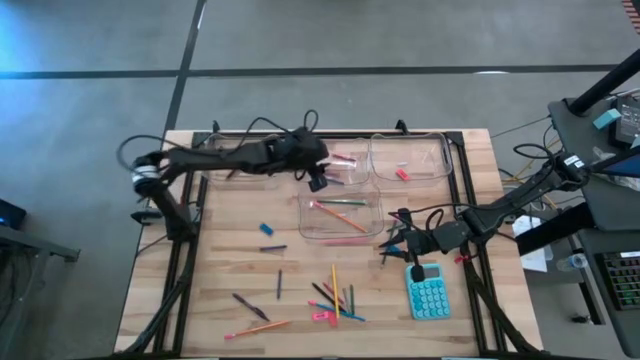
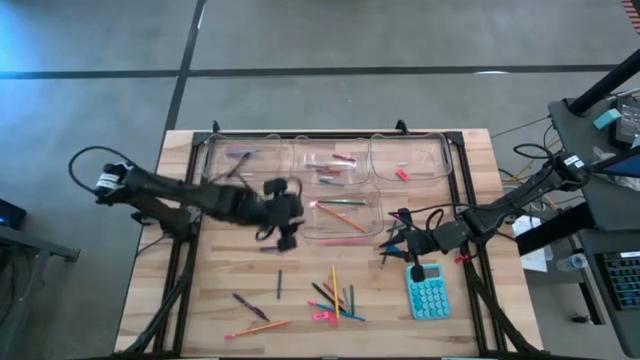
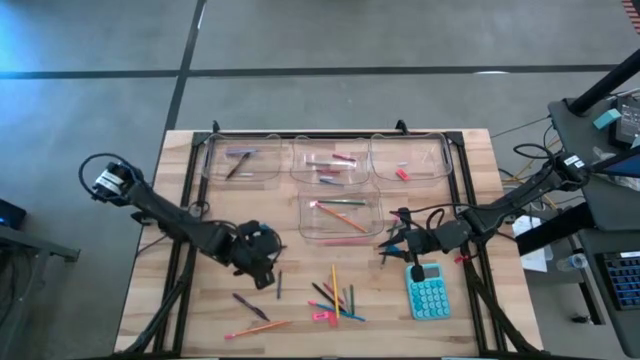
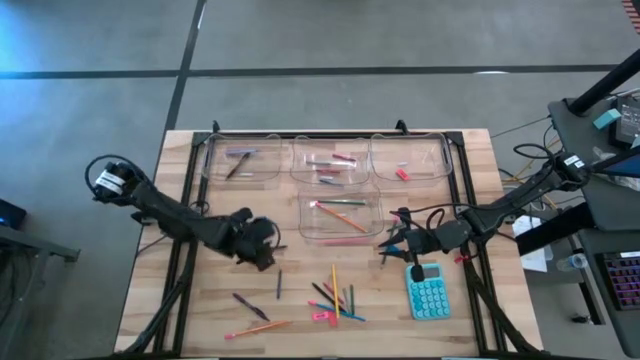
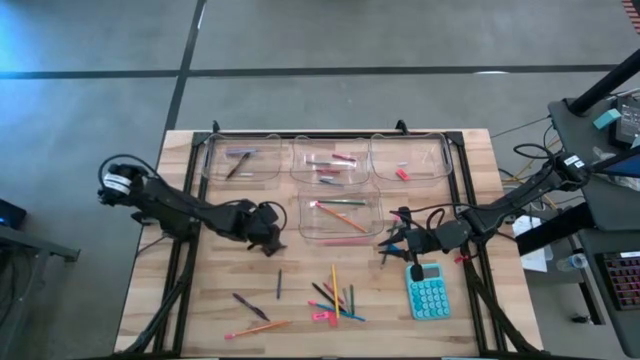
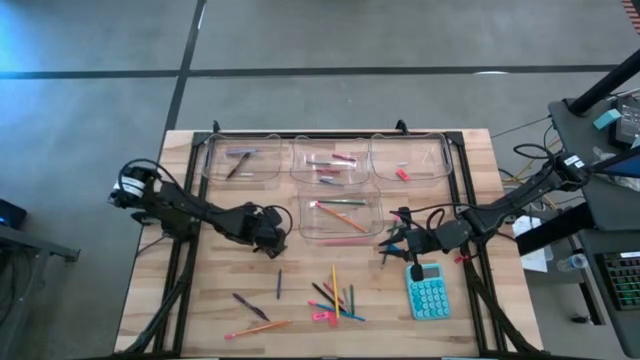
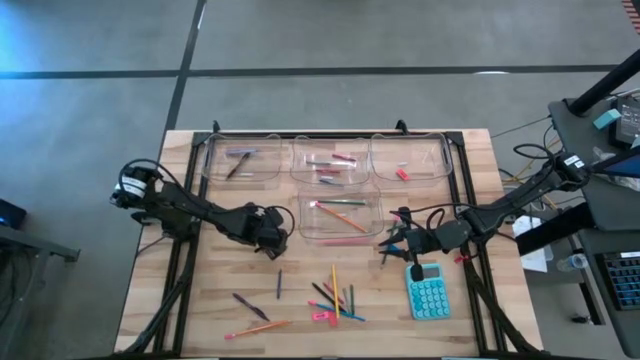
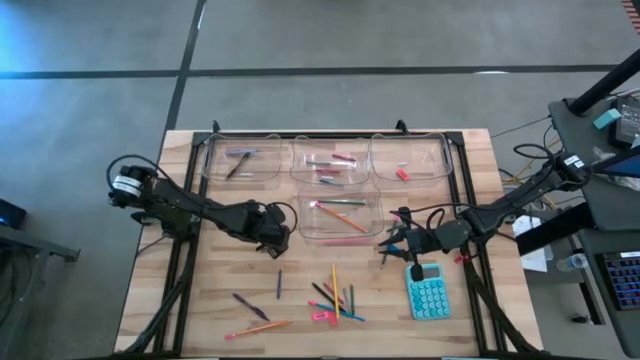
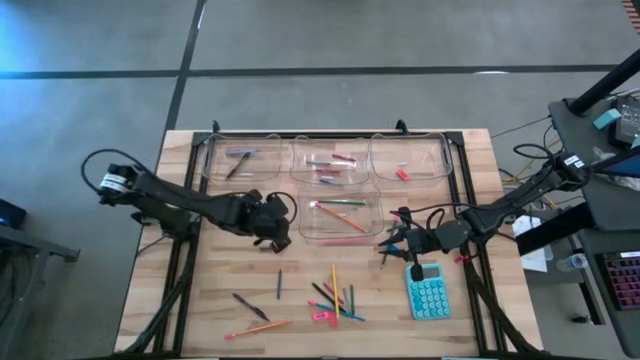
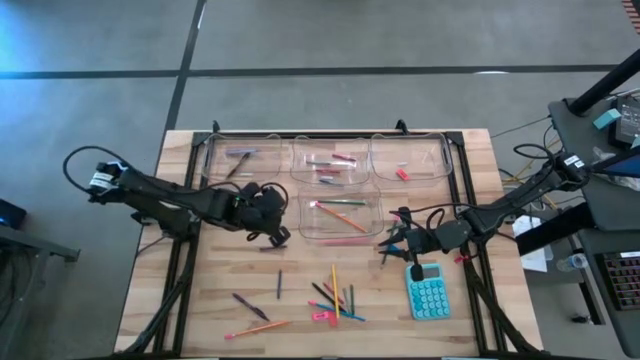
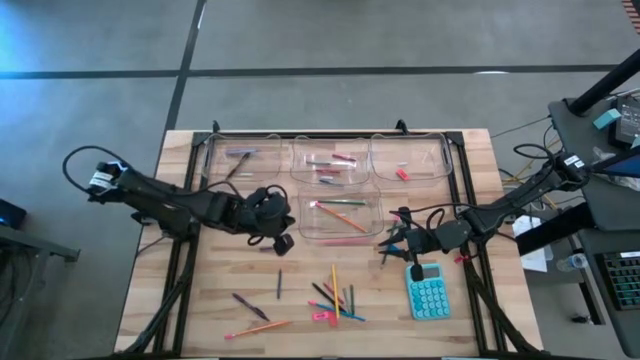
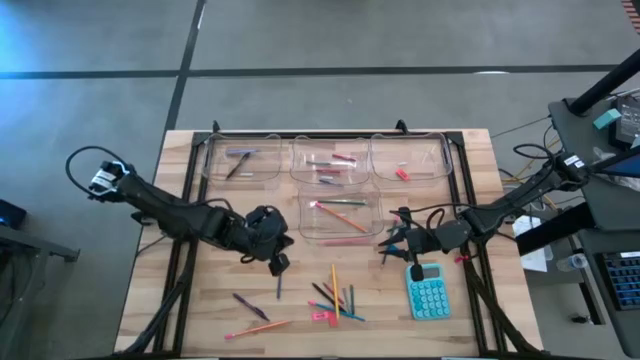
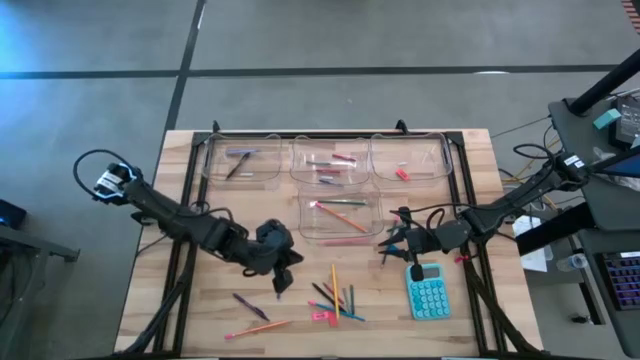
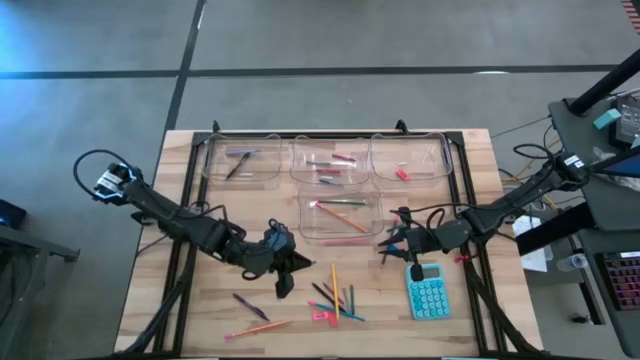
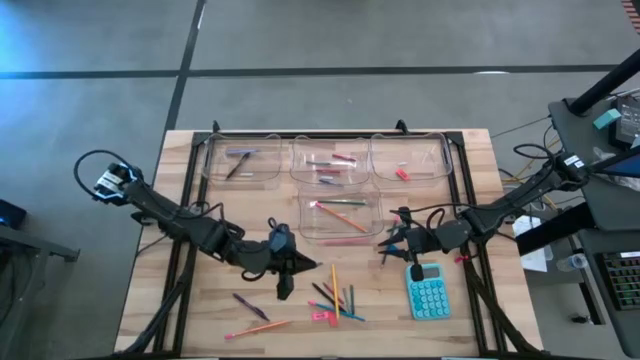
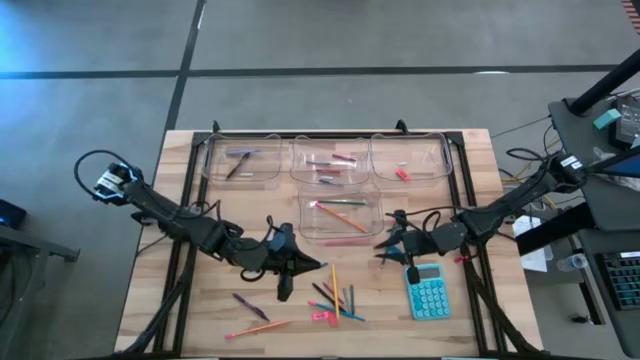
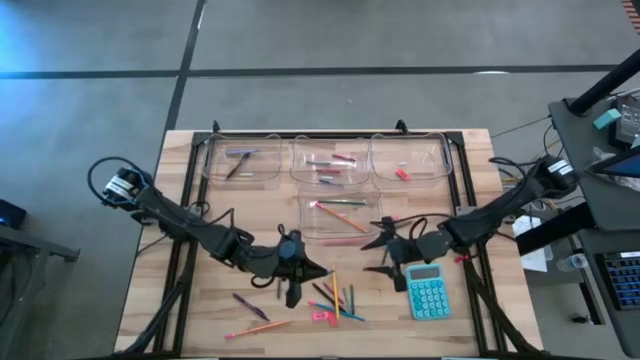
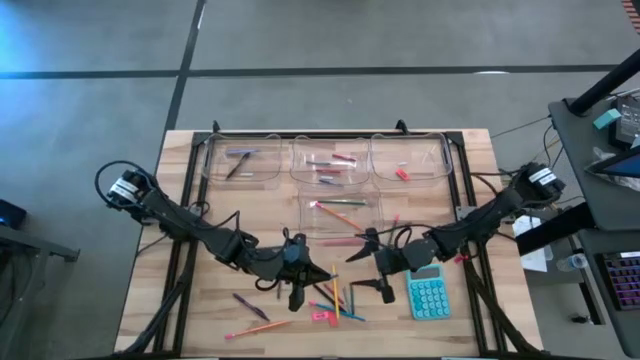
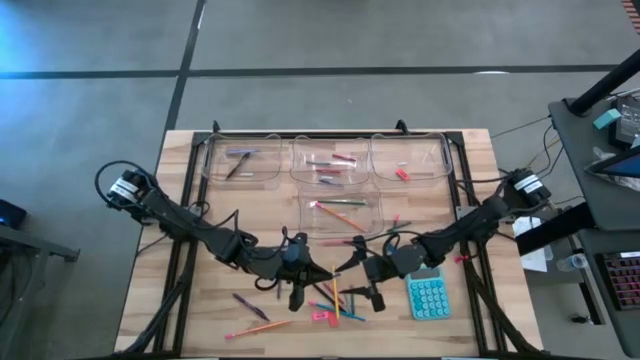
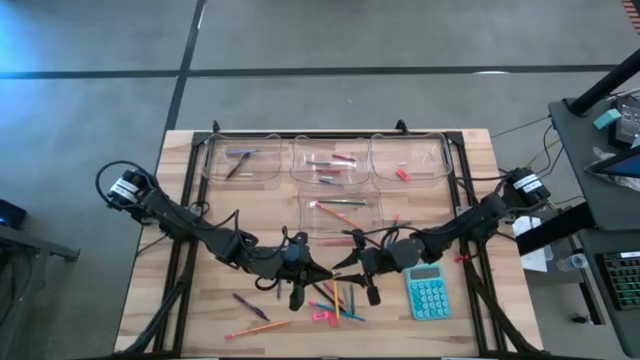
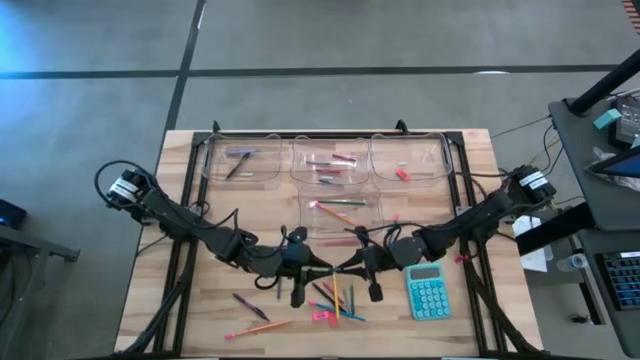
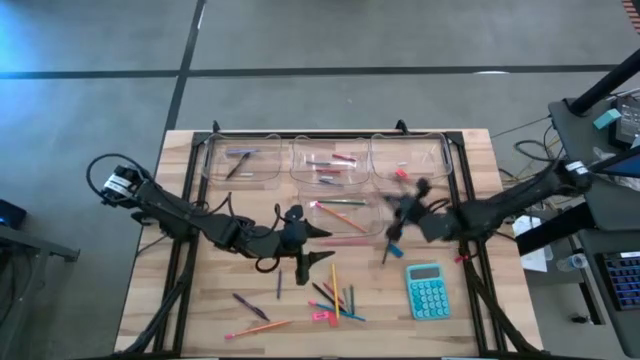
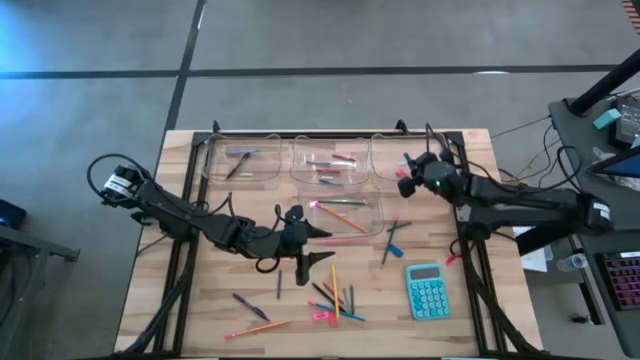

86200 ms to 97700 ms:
Task: Sort crayons/erasers/pens/pencils in bins
Put the left blue eraser into the top right transparent bin

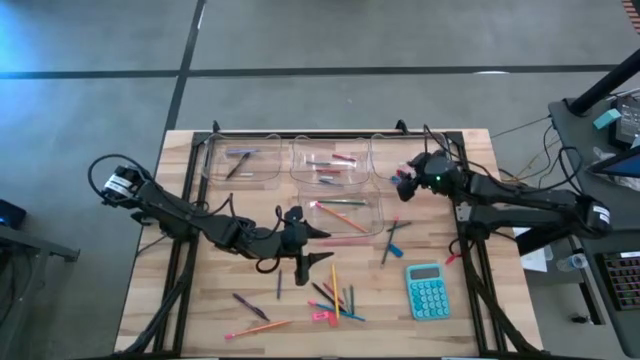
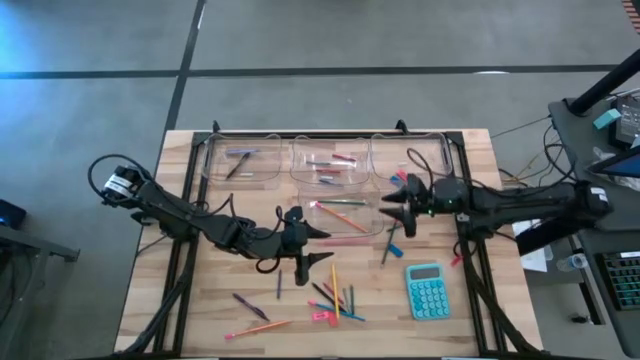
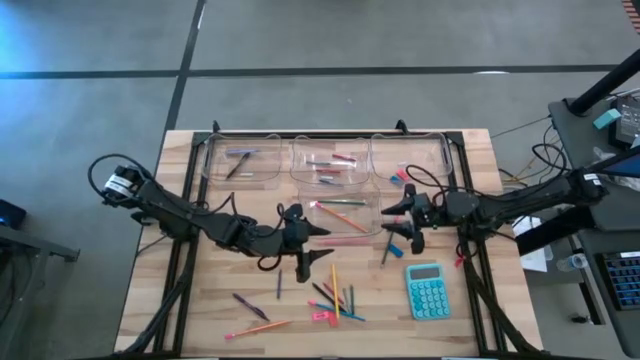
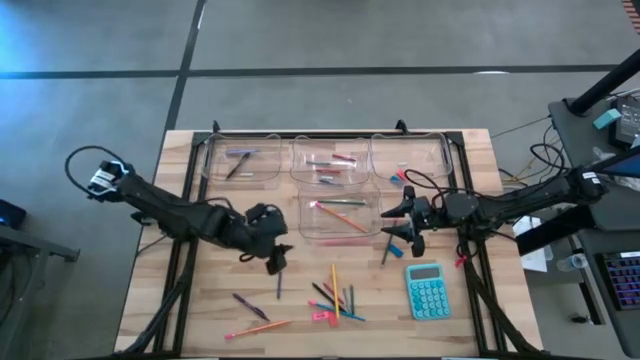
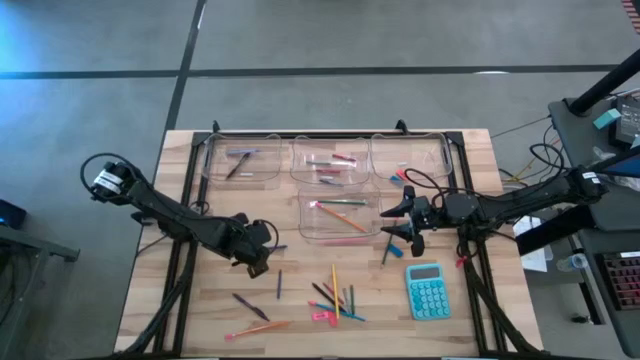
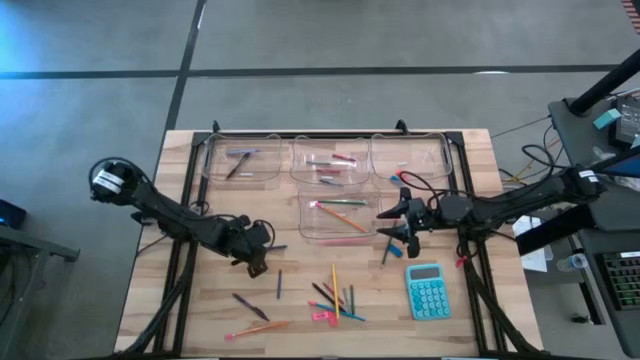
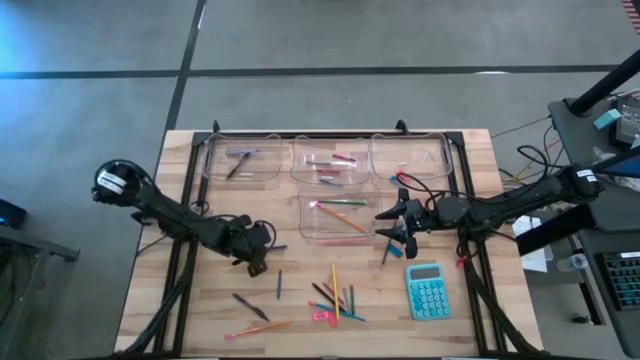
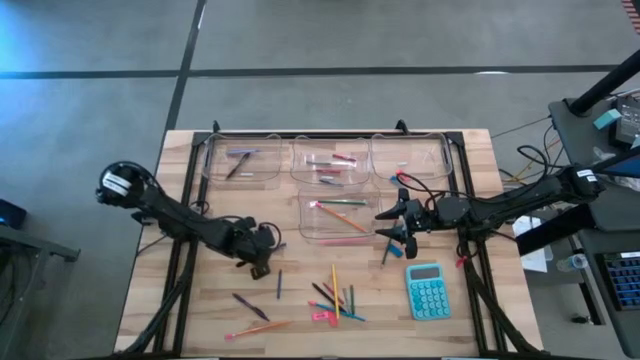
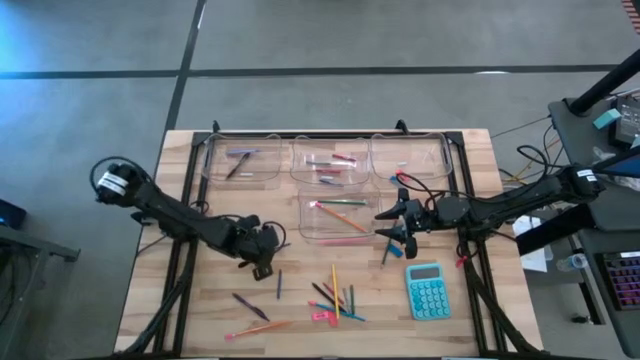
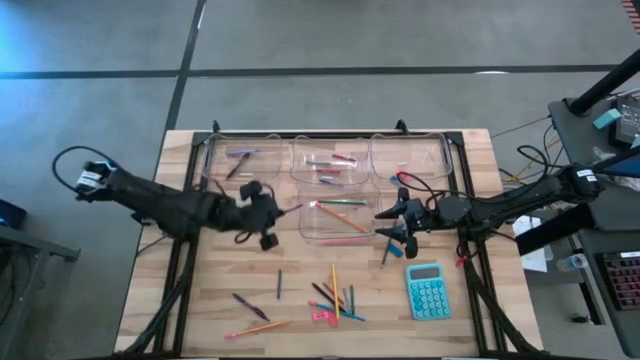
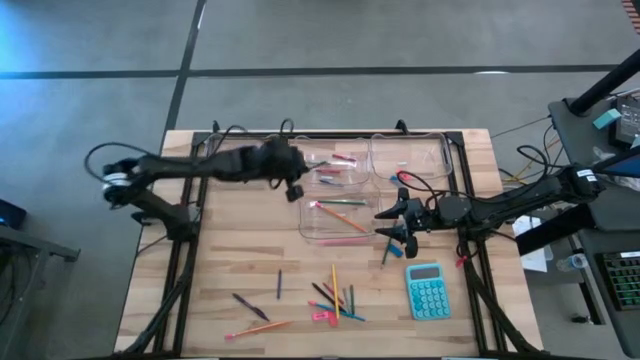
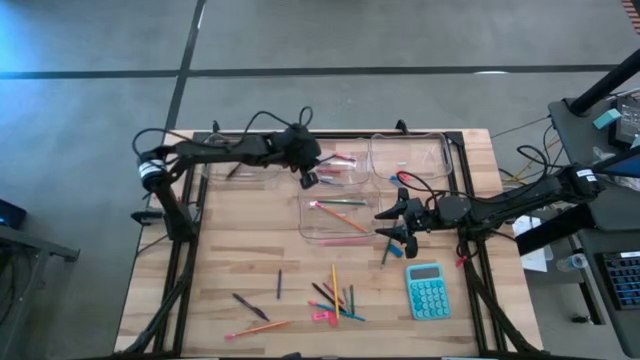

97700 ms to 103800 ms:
Put the top blue crayon into the top middle transparent bin

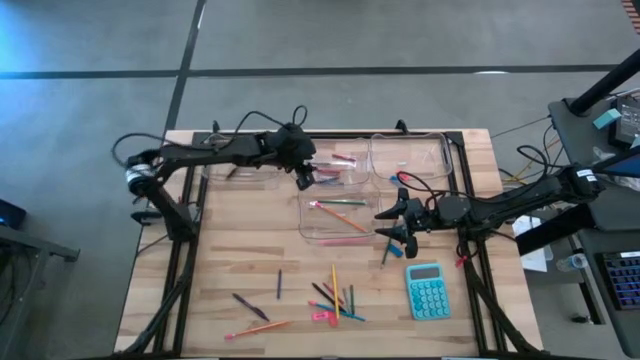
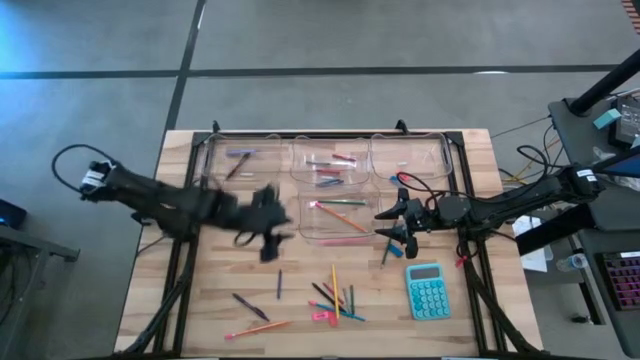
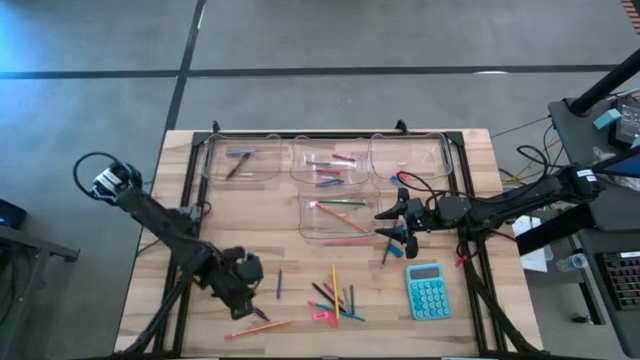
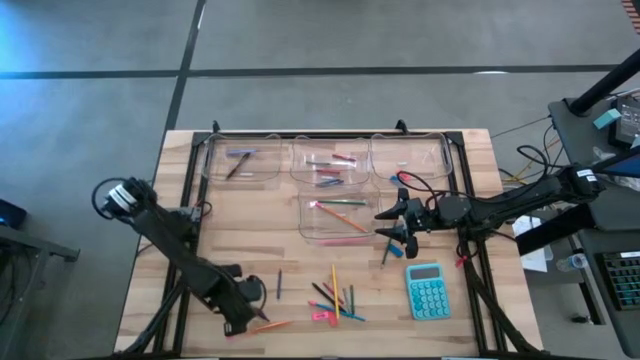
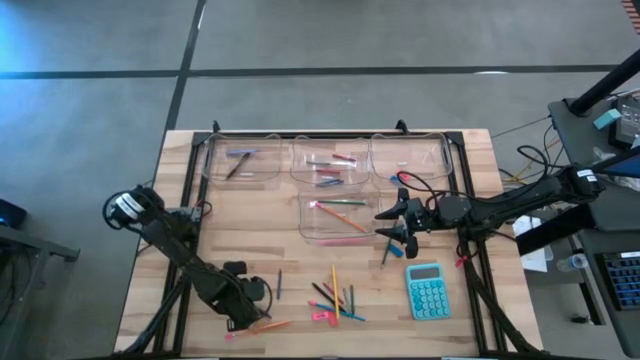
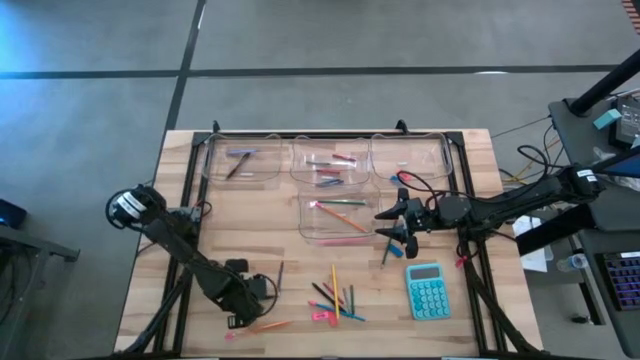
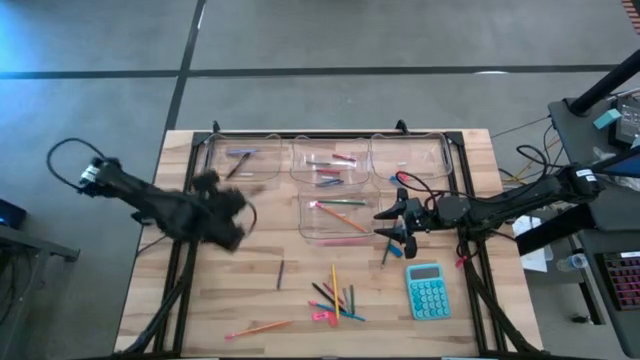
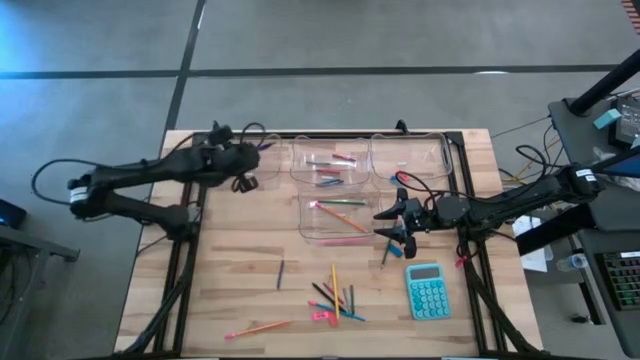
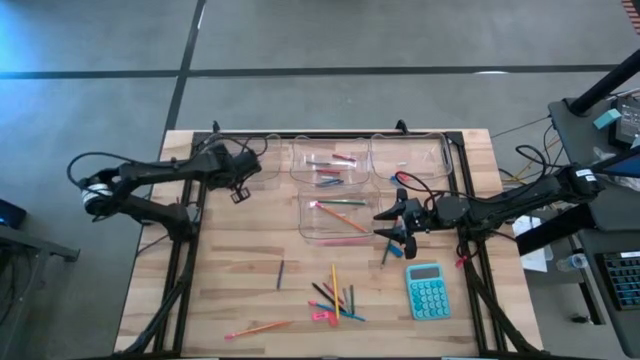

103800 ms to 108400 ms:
Put the violet pen into the top left transparent bin
